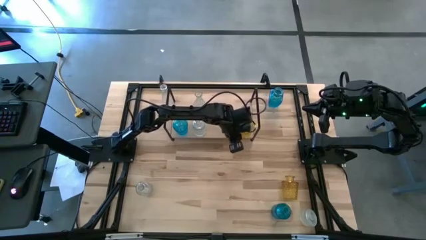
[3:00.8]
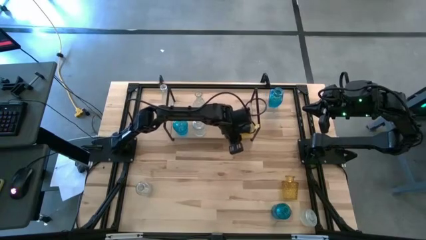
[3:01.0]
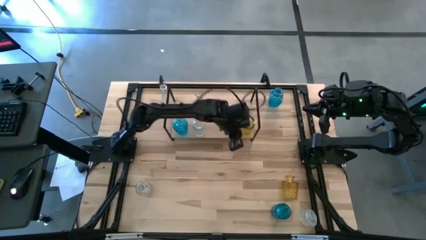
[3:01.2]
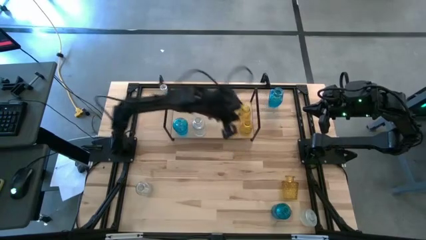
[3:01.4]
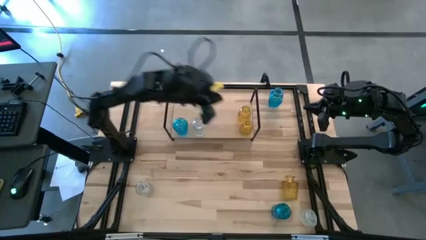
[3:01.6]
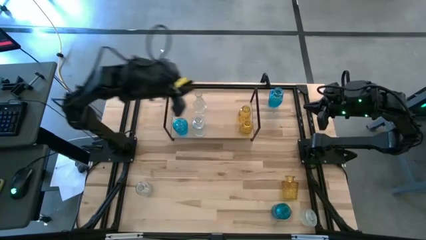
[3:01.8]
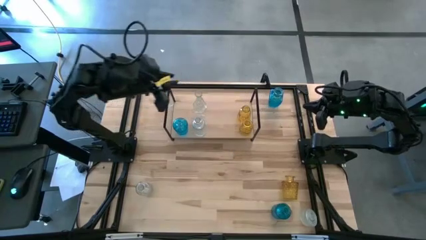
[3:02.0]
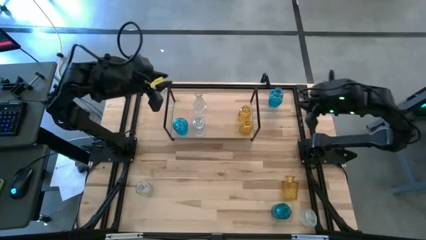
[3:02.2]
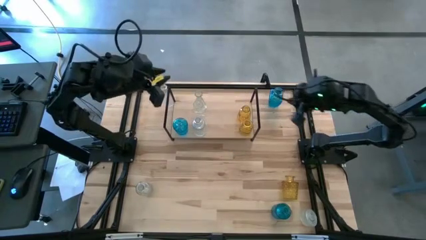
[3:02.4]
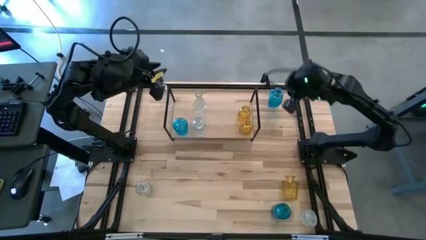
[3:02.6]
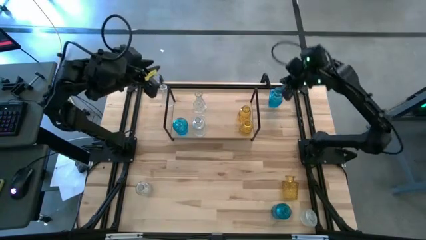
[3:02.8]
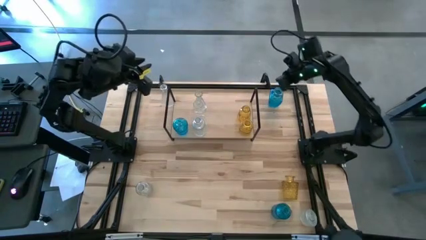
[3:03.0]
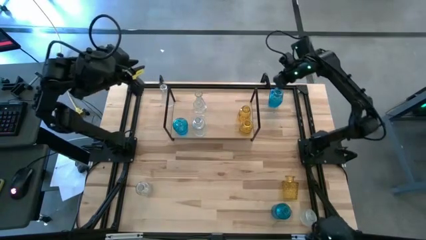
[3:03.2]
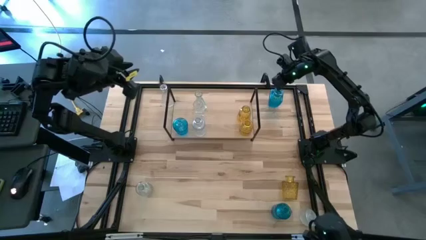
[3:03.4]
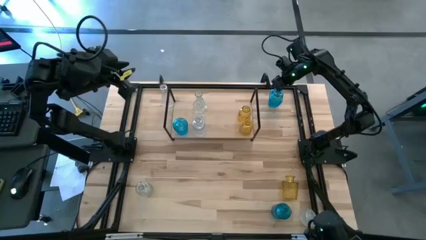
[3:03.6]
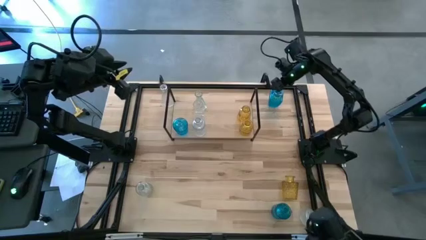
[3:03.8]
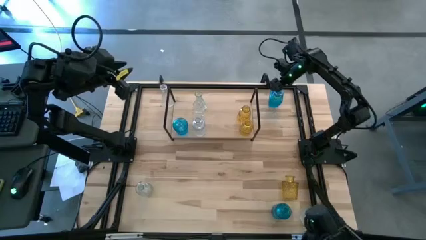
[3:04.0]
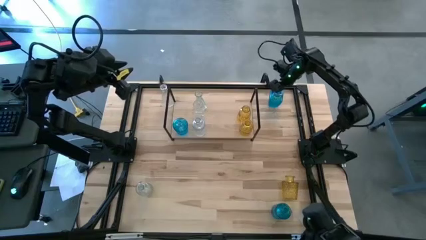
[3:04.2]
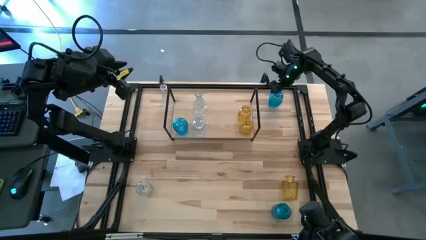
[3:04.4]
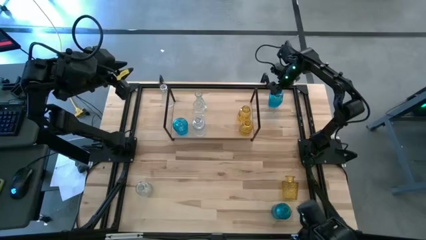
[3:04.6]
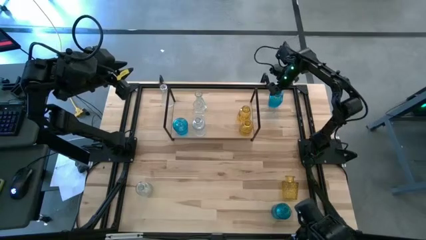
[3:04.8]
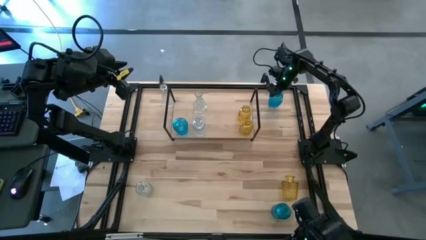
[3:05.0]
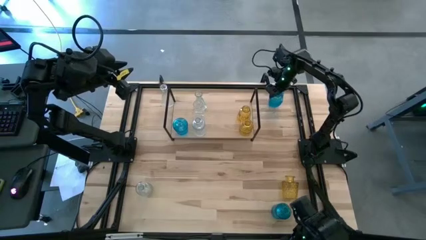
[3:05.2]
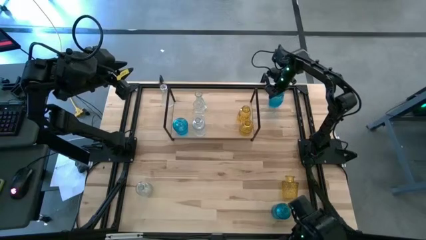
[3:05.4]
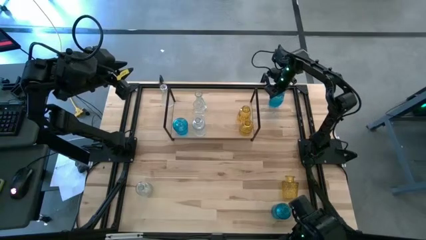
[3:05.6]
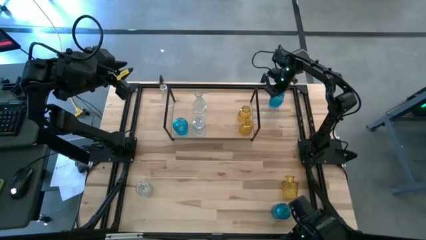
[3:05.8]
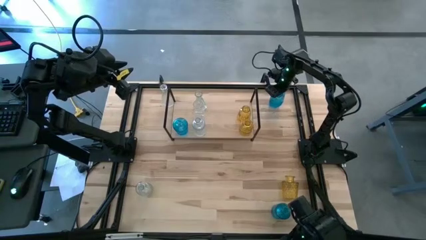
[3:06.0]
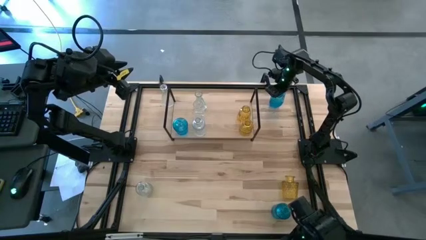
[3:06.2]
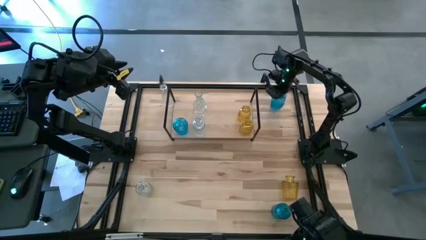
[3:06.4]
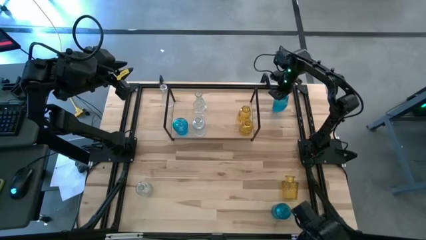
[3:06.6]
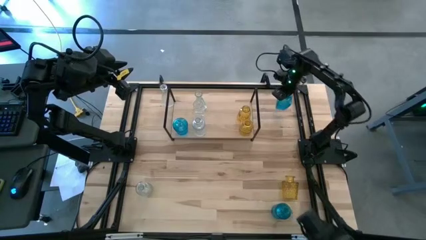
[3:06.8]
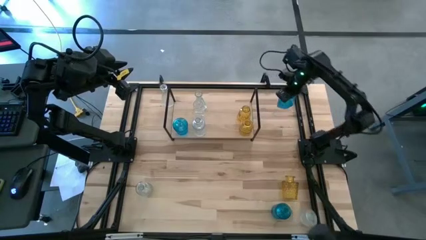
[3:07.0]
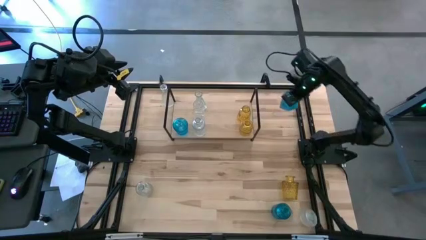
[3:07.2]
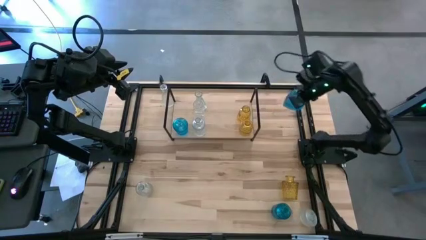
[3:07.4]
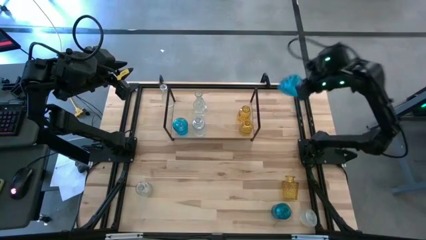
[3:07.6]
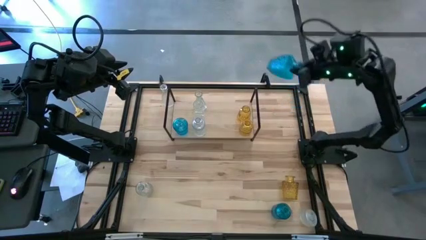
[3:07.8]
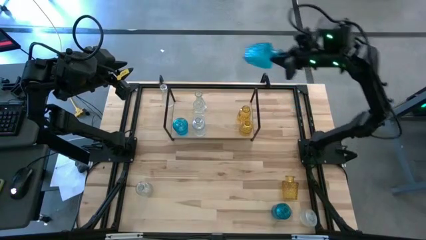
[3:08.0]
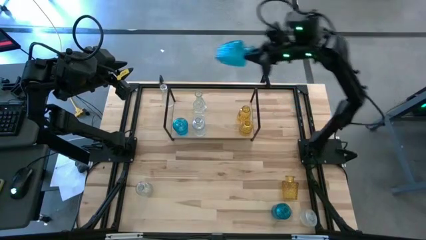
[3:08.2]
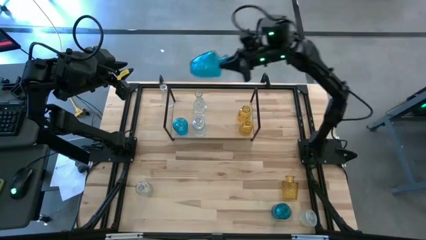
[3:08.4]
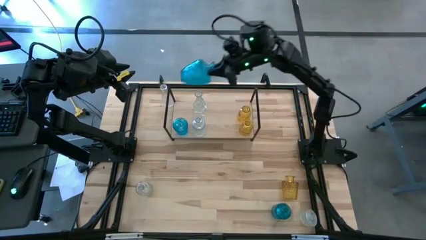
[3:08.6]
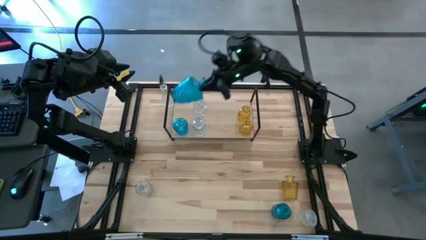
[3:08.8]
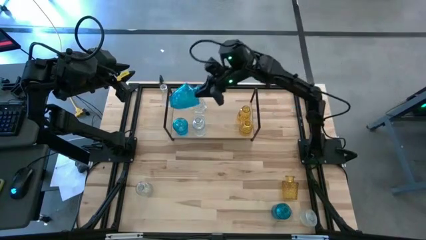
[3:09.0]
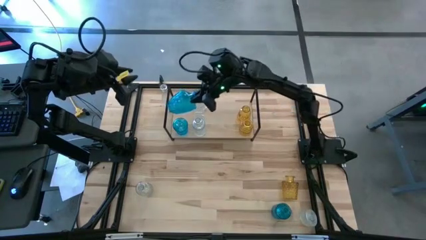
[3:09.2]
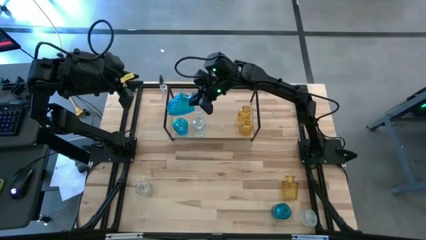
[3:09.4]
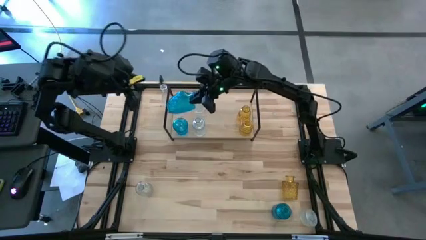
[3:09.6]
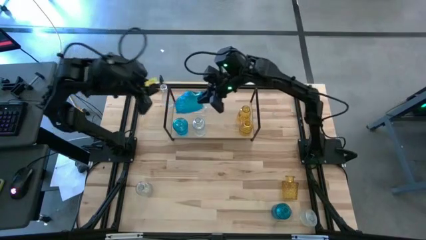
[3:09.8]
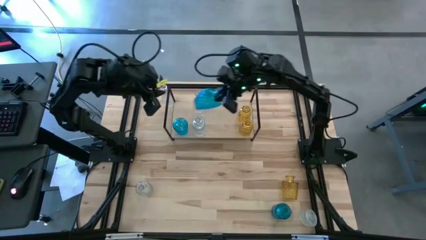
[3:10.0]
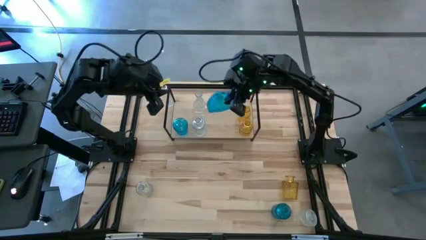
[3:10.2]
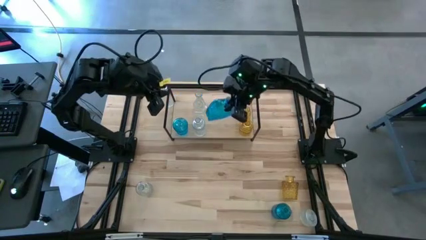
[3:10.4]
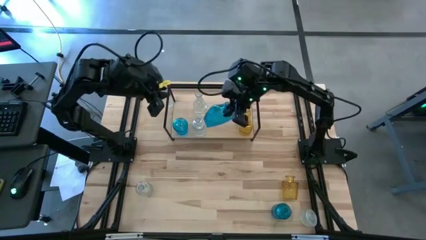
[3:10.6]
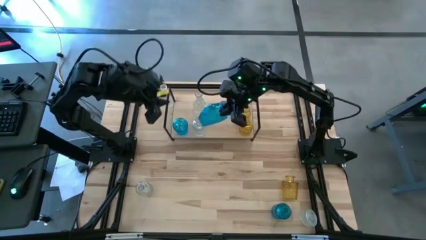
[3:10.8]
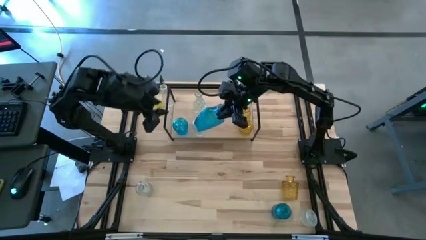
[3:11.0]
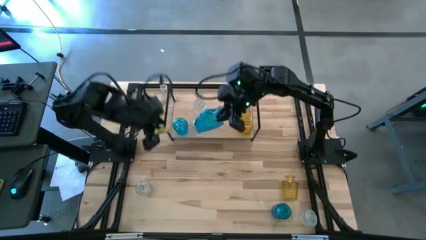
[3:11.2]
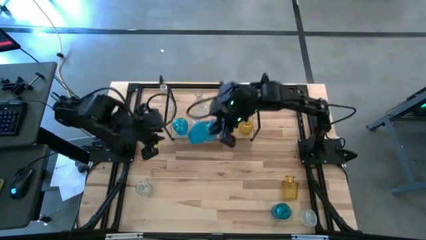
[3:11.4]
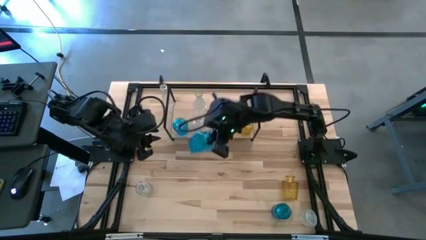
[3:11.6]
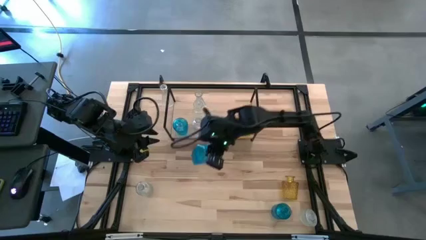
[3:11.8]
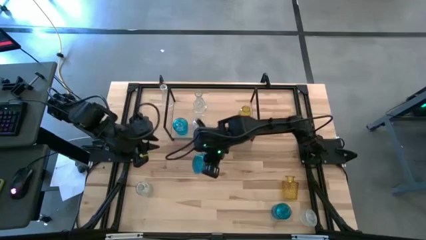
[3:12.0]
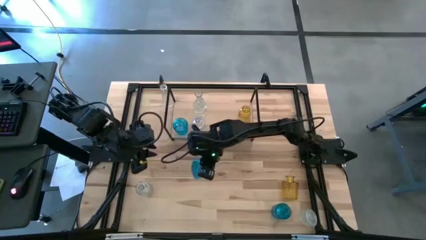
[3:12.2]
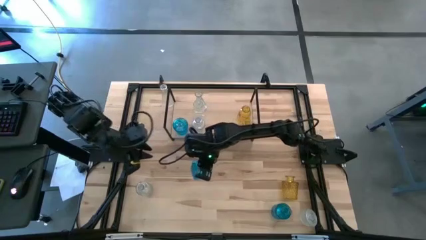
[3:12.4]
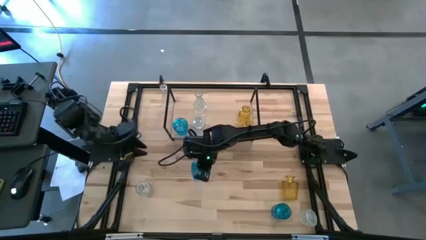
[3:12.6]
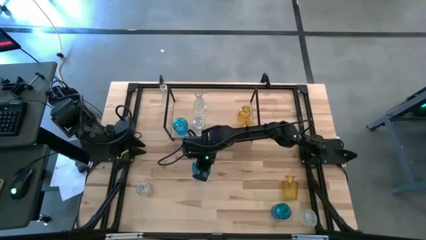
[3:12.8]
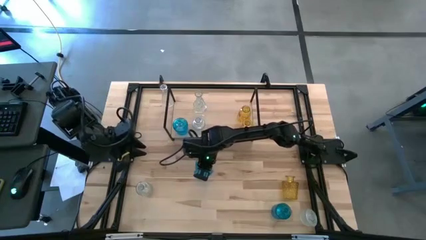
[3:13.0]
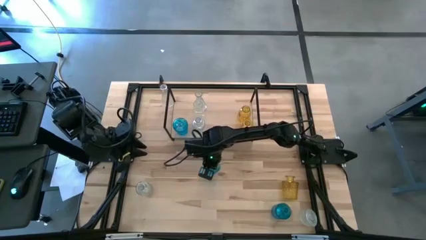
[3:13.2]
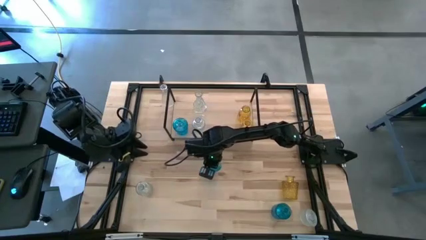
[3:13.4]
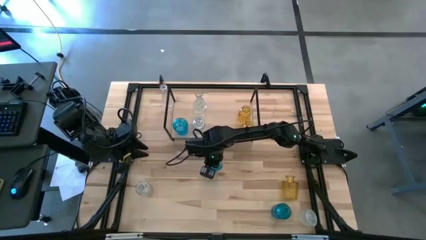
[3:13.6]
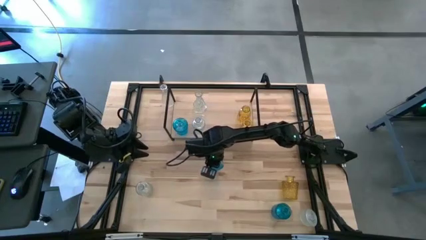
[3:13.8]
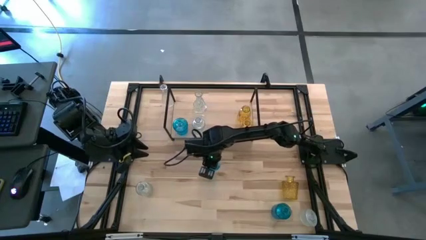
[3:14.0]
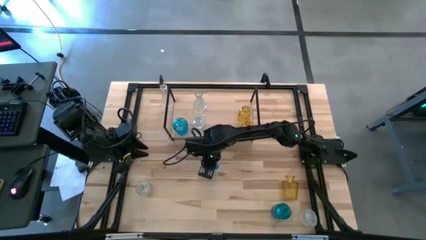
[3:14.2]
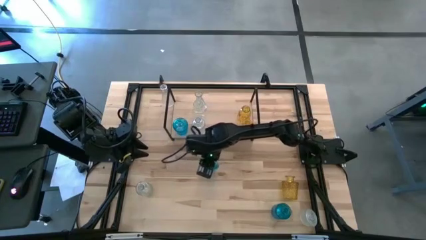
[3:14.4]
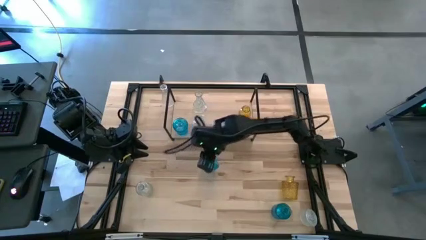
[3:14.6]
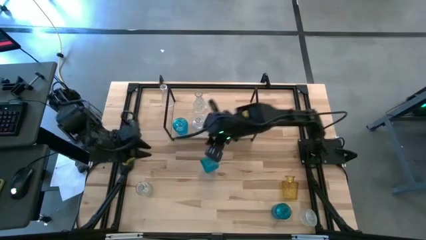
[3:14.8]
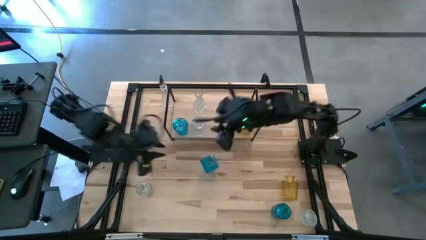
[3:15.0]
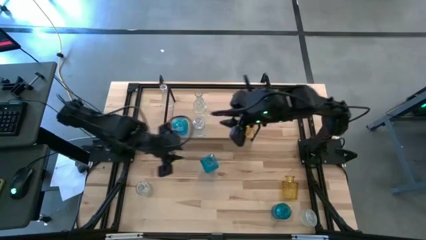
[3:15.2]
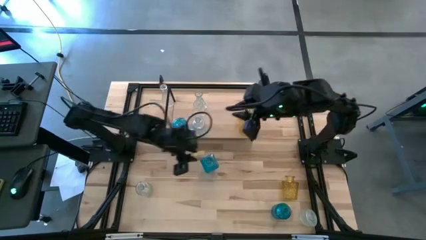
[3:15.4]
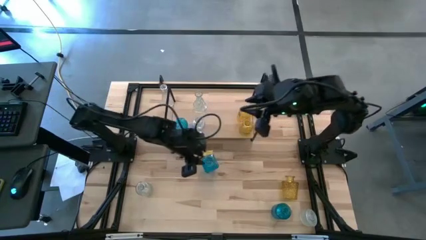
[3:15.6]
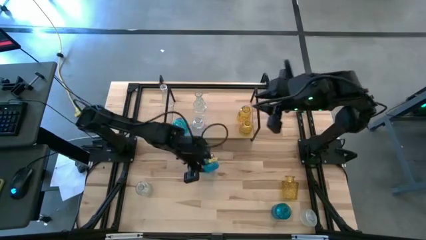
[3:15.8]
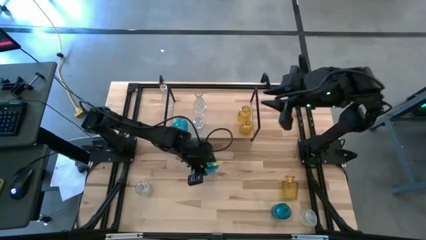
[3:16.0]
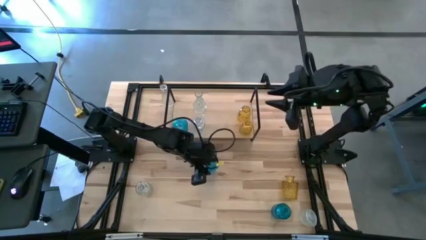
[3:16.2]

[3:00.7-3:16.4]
Task: sort vases onto shelf
Put the blue vase on the shelf aligned with the other blue vase
